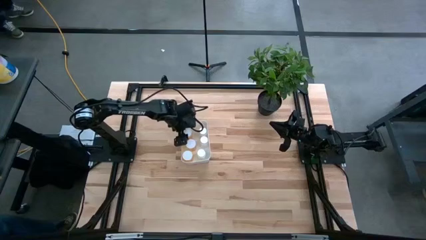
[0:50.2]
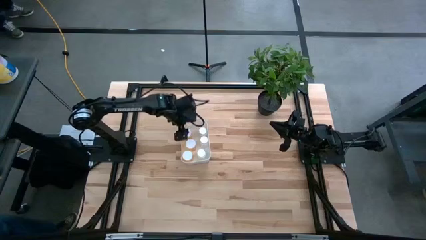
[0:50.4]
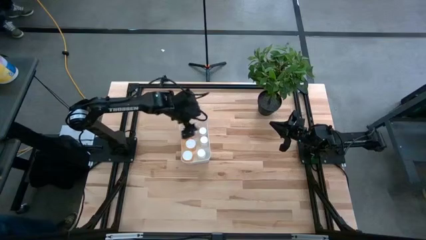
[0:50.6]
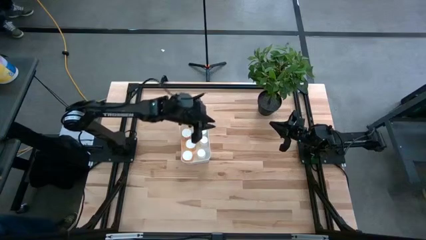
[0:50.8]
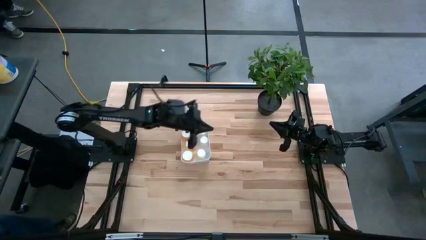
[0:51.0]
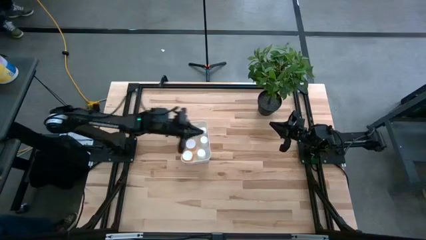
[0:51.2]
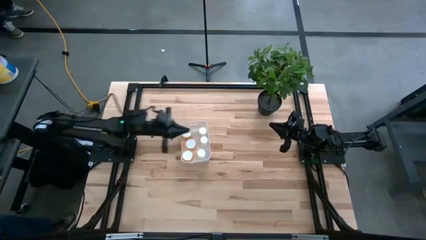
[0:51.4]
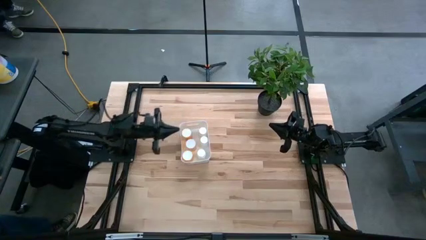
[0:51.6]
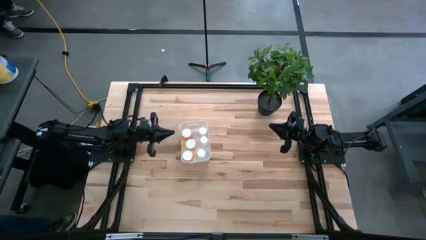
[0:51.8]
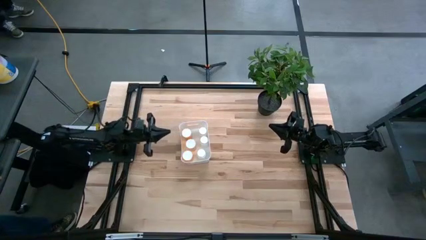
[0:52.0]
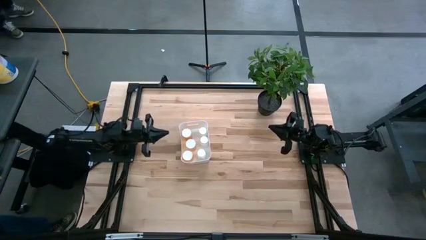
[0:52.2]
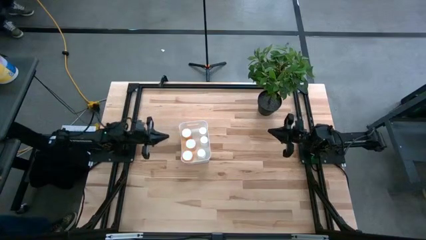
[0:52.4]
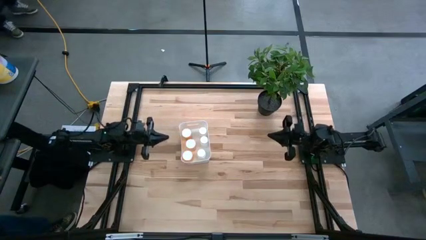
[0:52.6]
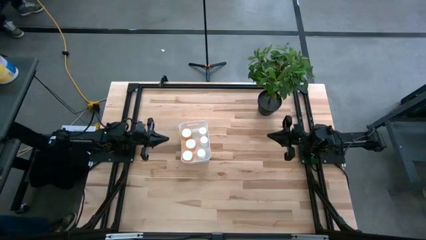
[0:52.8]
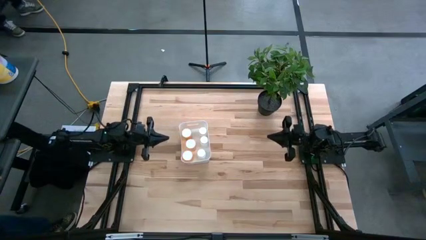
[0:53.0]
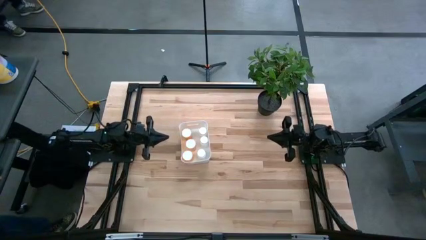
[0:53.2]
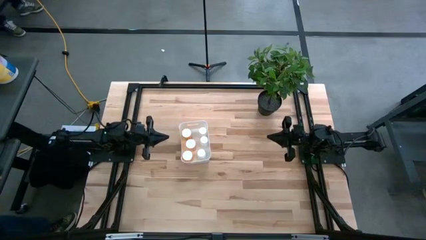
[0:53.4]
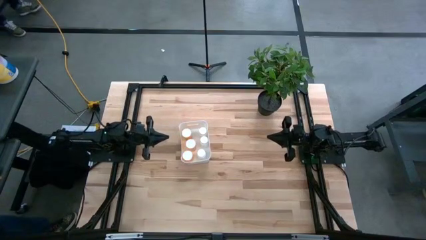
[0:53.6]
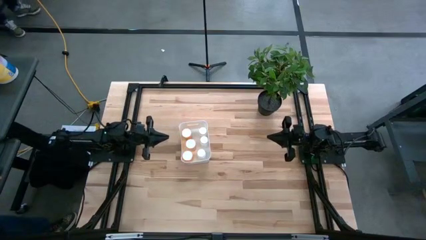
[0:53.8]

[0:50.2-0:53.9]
Task: Pick and place pill bottles into a basket
Return to Home Position

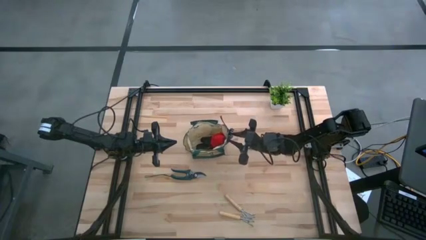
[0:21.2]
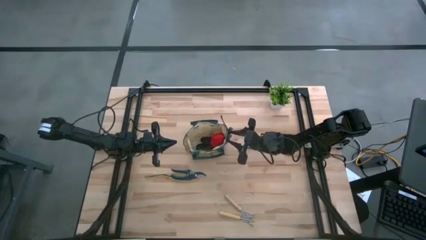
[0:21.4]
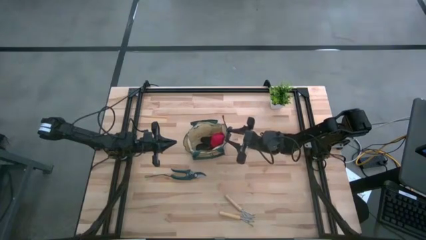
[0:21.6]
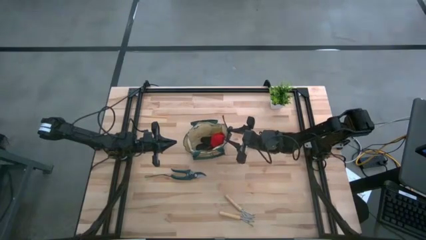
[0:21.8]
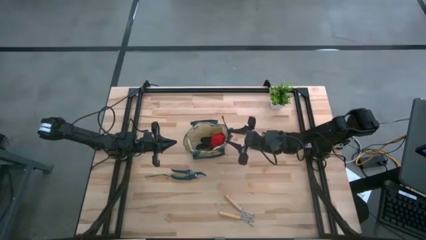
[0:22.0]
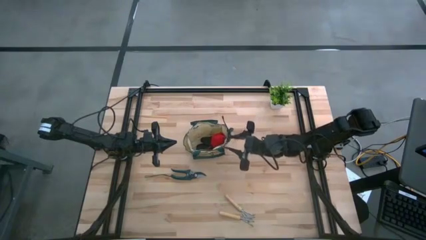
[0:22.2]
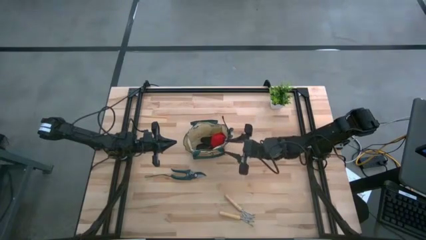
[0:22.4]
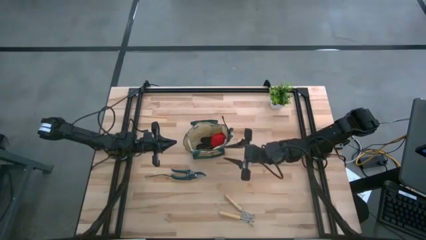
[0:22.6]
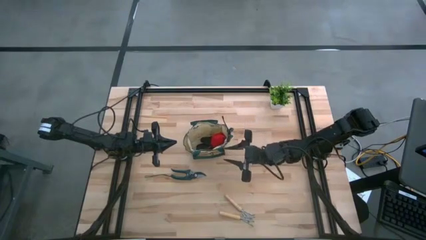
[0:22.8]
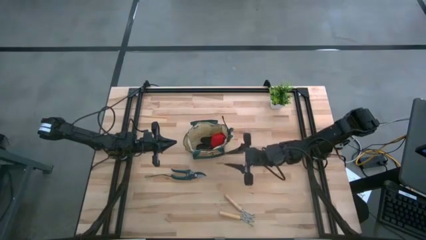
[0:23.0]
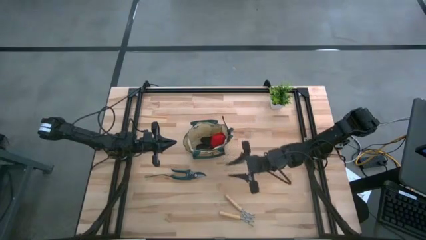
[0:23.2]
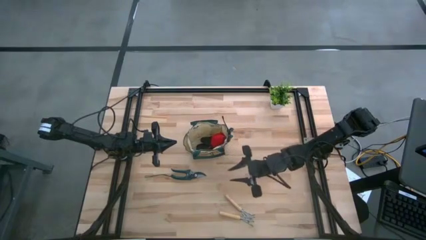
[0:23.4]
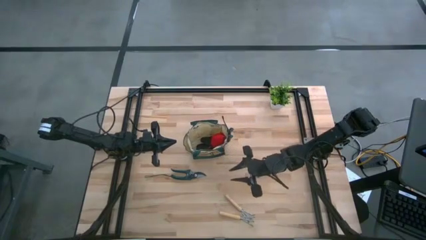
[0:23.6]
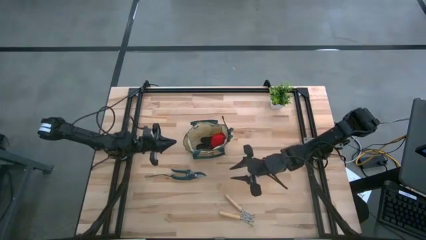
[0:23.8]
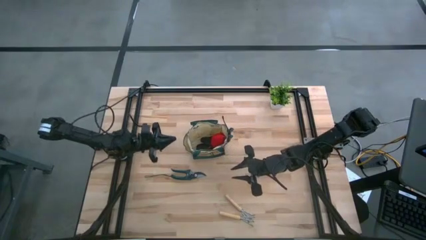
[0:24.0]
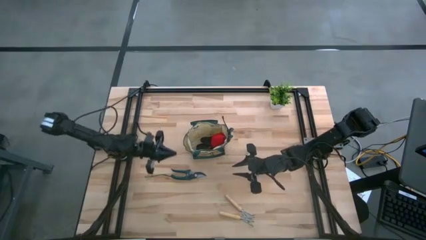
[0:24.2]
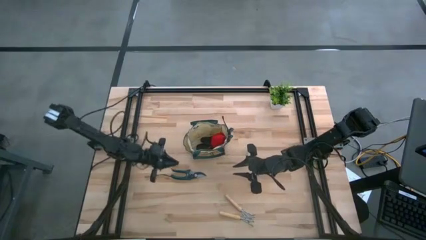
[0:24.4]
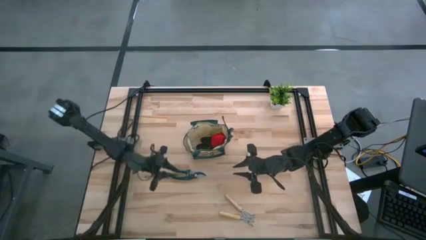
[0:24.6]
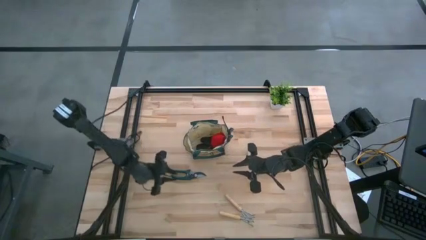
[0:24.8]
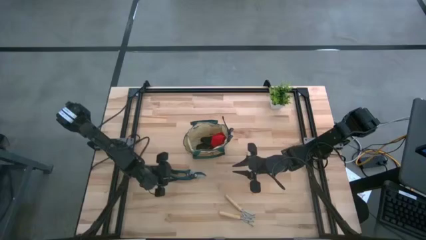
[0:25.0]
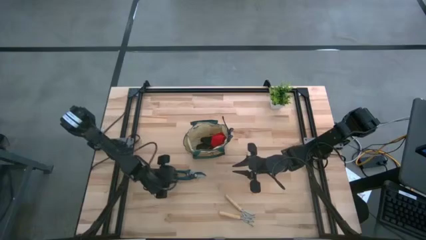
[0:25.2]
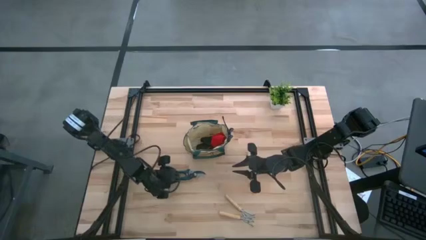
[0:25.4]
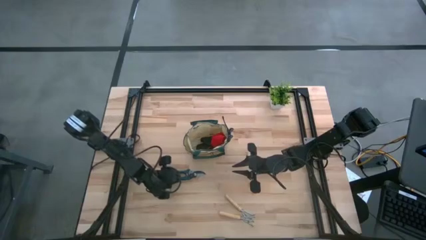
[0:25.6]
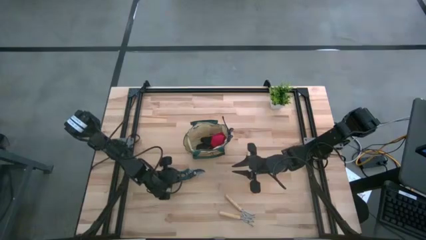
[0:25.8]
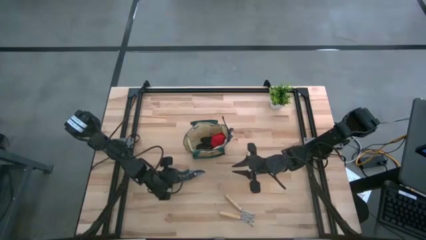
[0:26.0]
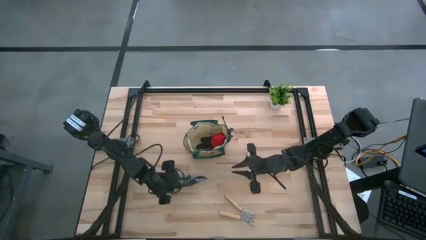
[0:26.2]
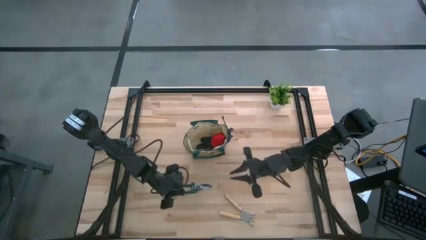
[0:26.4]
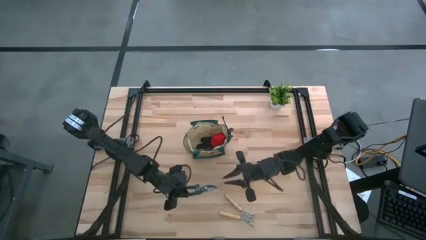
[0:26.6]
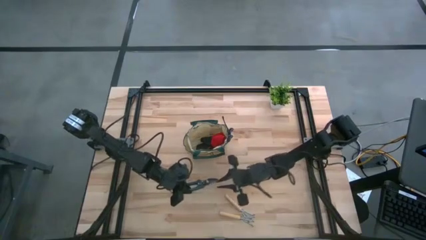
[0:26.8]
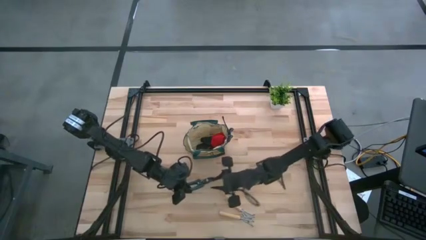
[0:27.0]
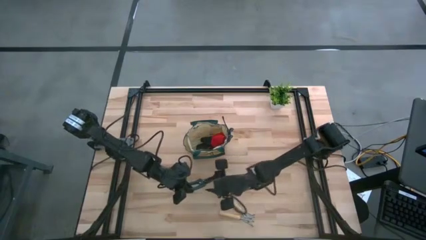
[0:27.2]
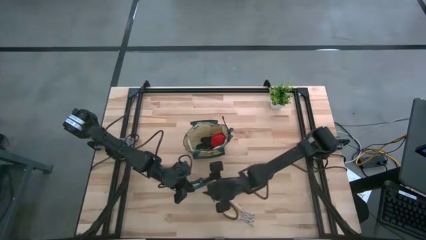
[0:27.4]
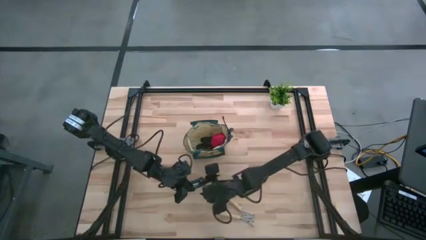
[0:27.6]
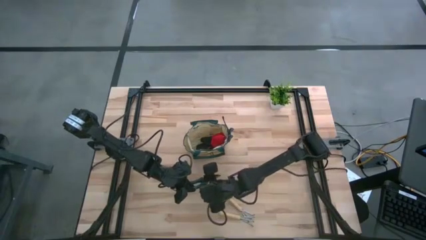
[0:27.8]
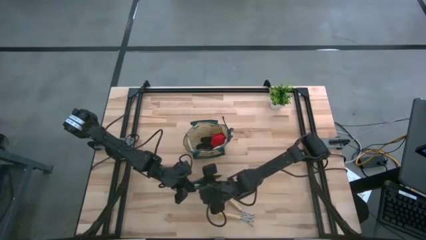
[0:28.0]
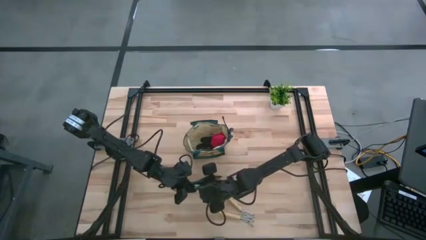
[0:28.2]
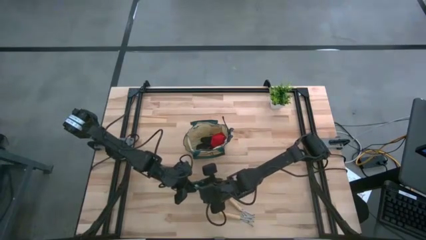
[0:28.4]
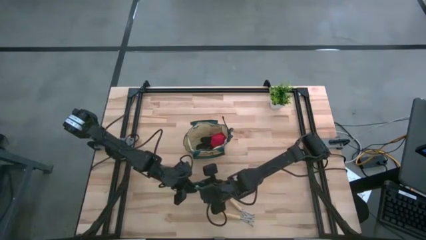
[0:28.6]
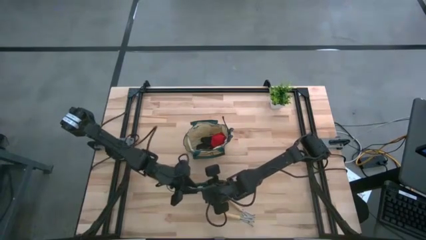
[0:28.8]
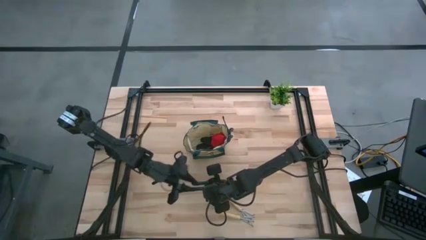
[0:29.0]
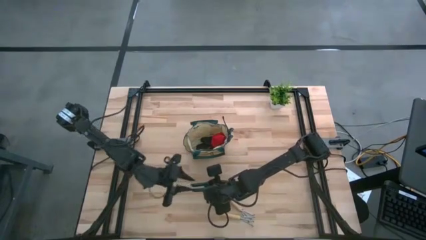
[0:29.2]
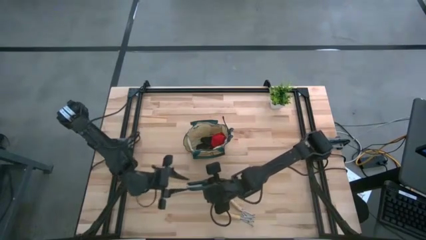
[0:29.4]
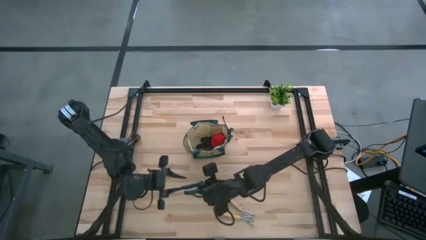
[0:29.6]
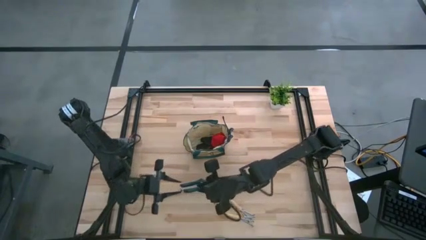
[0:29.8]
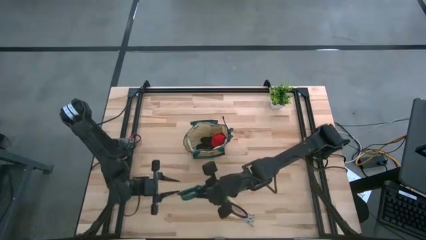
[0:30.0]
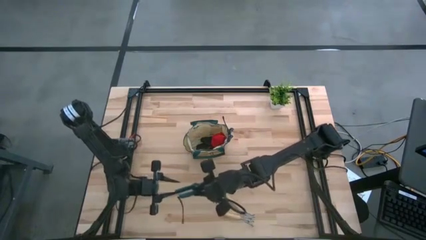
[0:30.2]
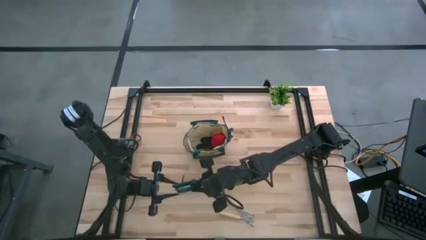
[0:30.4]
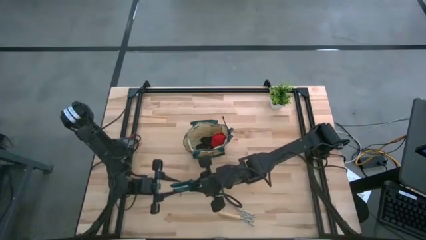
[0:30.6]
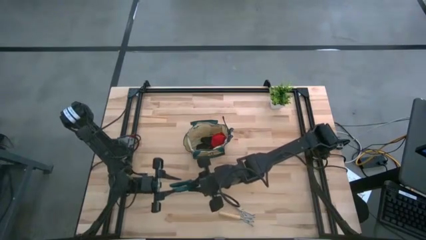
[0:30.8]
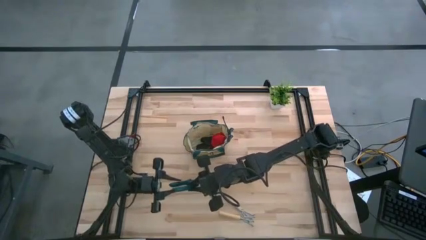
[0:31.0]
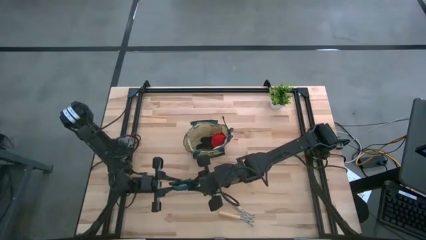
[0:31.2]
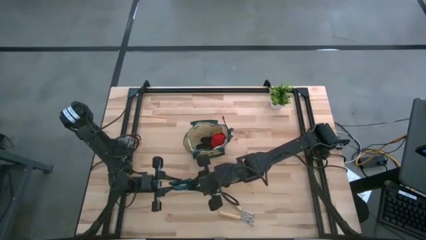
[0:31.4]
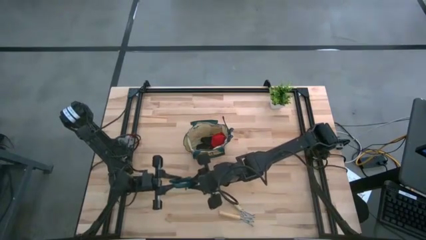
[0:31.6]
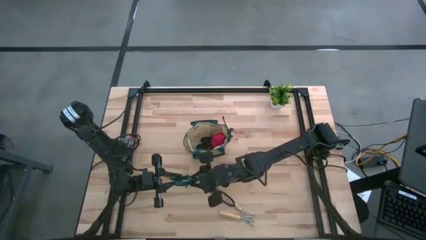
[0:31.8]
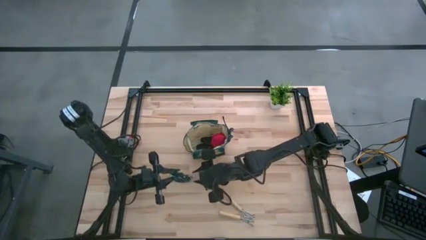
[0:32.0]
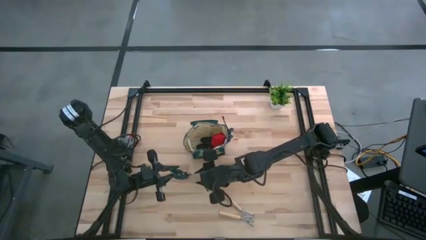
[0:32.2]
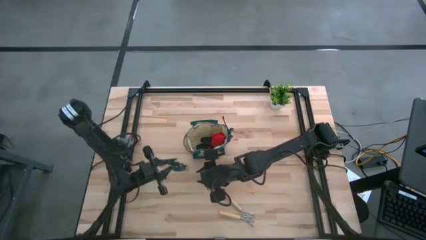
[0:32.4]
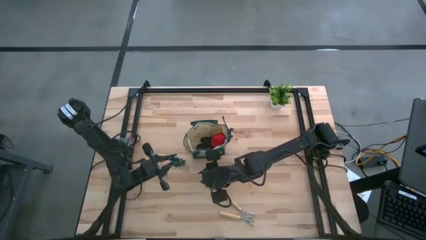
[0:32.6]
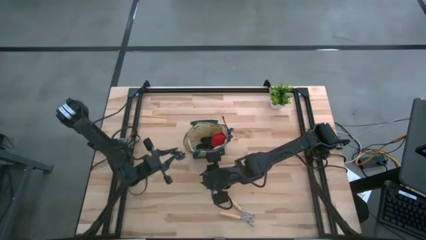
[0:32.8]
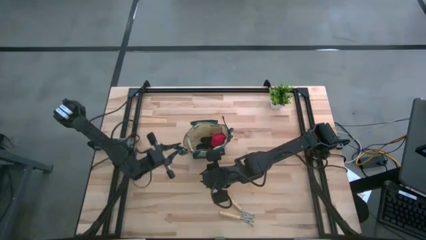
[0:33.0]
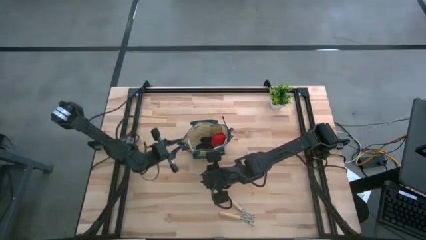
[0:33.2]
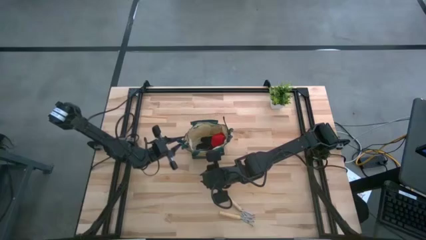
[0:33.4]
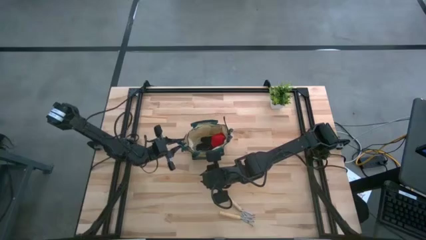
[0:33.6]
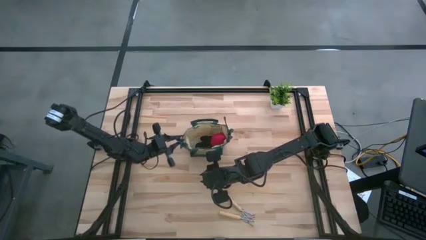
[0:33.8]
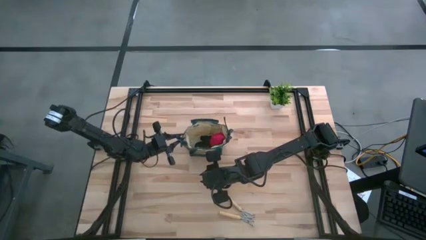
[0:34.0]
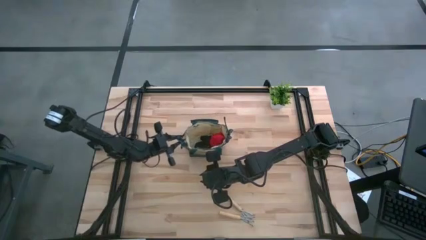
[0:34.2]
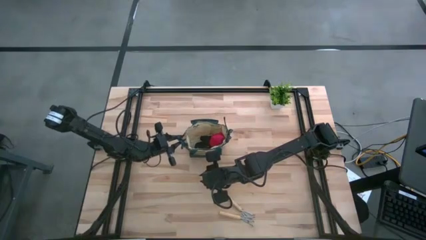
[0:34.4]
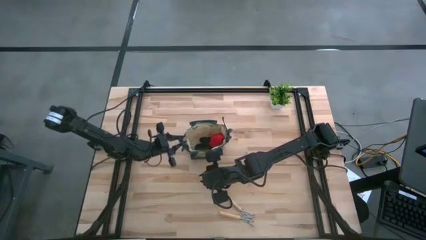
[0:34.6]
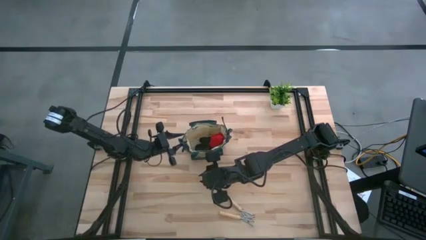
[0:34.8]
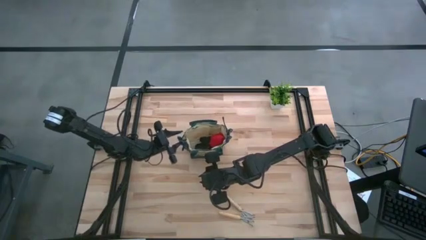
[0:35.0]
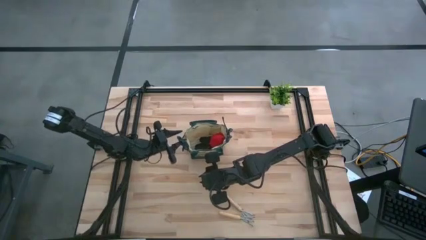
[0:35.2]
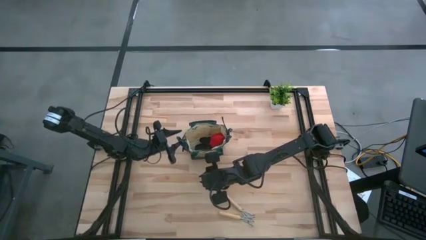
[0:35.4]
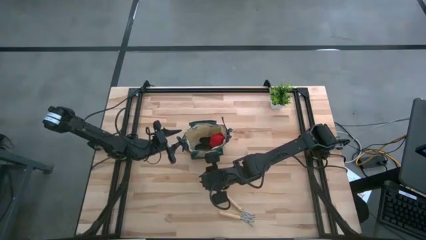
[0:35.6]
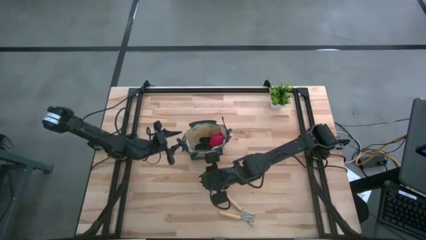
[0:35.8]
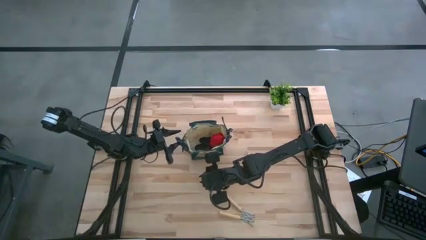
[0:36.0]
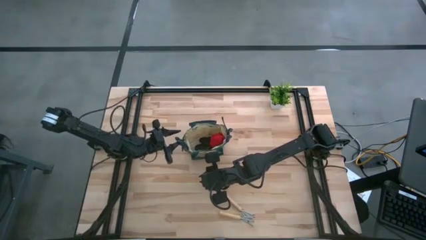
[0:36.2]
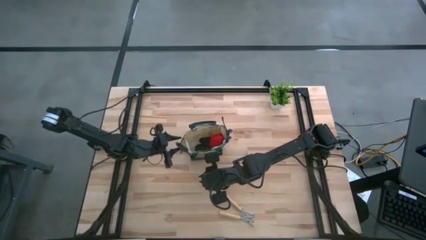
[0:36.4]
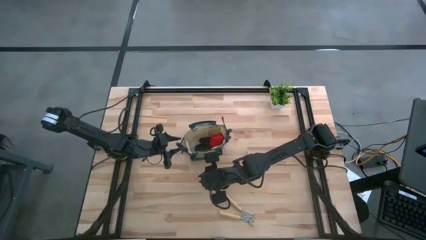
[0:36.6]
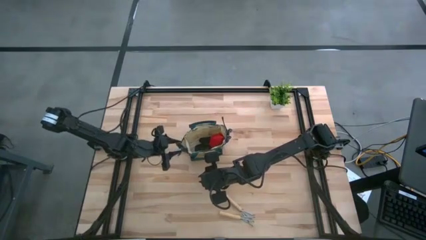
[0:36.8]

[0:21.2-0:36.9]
Task: Pick & Place Garden tools in Gardening bag
Put the green shear scissors into the brown gardening bag
